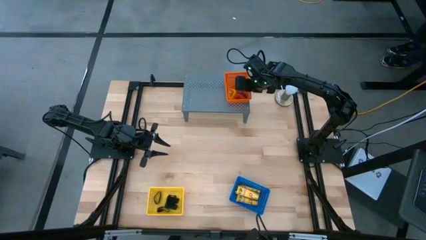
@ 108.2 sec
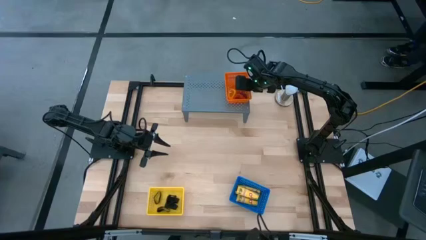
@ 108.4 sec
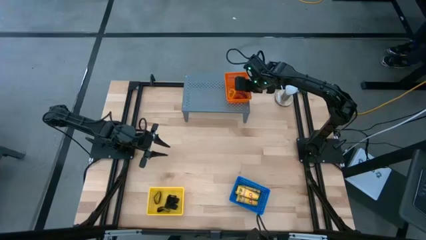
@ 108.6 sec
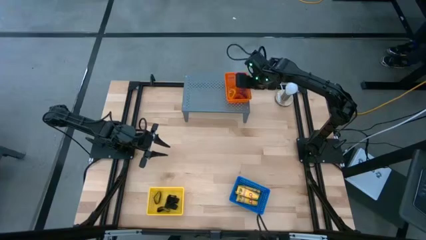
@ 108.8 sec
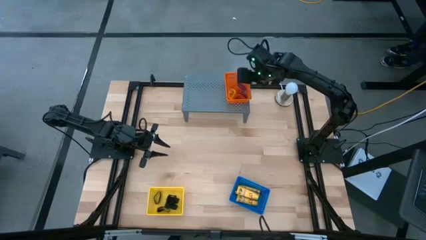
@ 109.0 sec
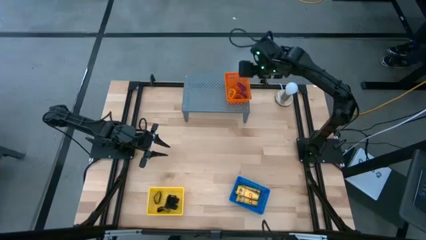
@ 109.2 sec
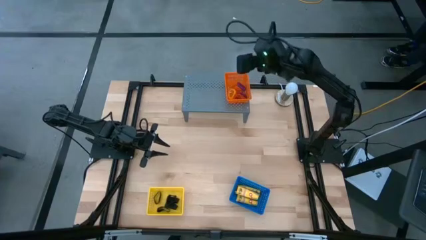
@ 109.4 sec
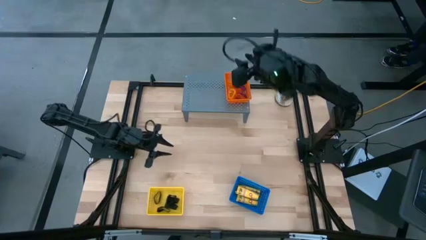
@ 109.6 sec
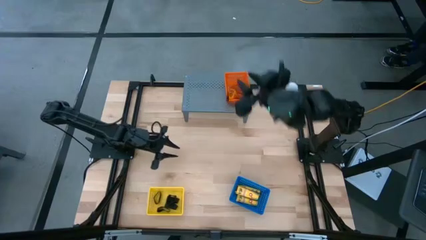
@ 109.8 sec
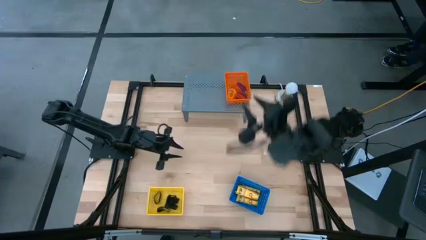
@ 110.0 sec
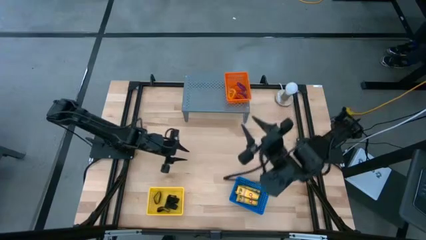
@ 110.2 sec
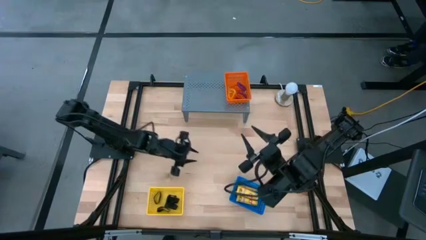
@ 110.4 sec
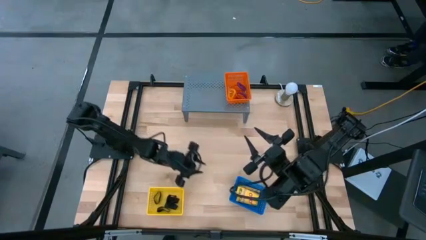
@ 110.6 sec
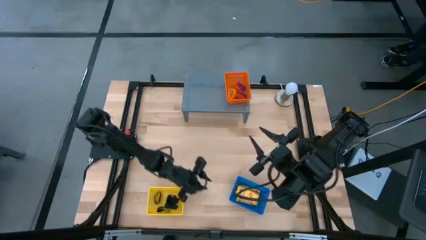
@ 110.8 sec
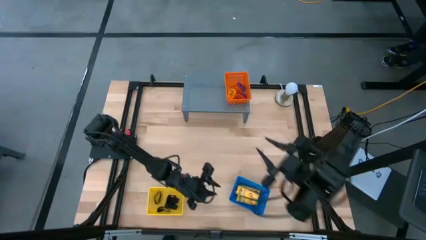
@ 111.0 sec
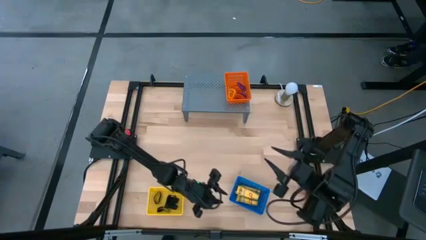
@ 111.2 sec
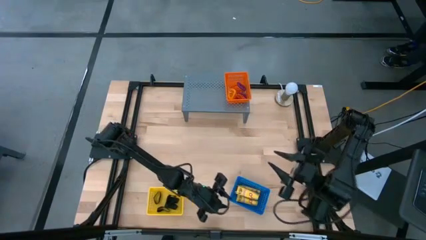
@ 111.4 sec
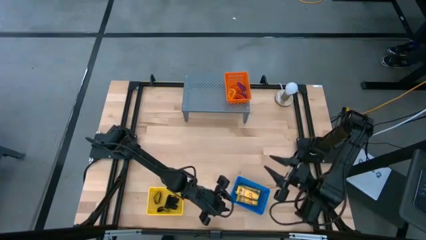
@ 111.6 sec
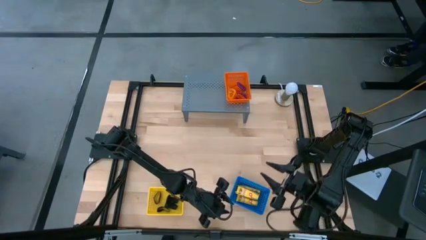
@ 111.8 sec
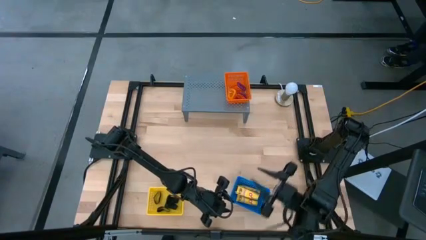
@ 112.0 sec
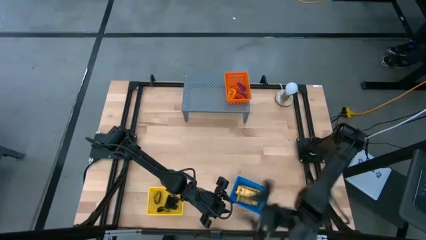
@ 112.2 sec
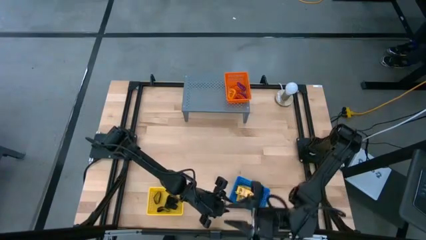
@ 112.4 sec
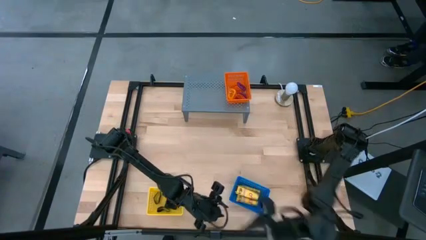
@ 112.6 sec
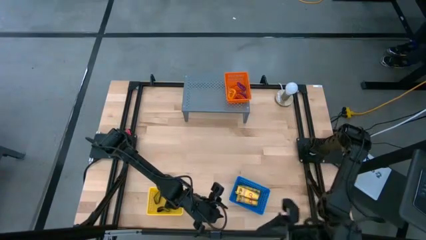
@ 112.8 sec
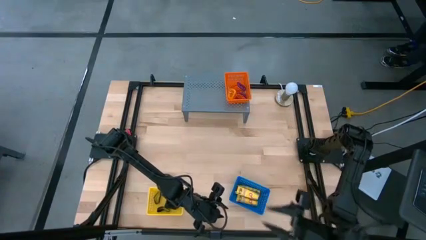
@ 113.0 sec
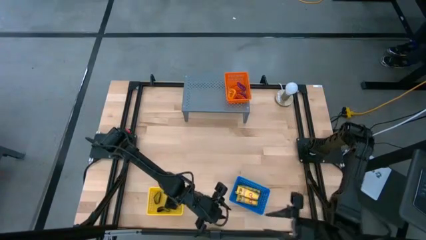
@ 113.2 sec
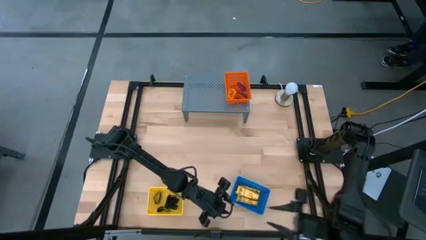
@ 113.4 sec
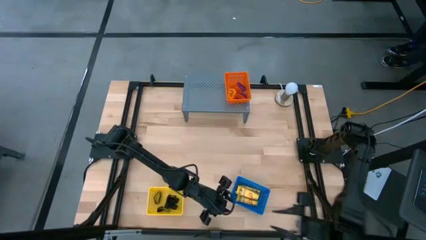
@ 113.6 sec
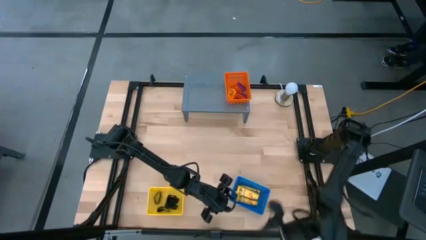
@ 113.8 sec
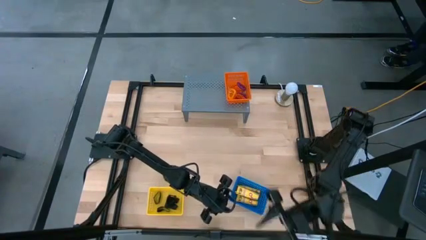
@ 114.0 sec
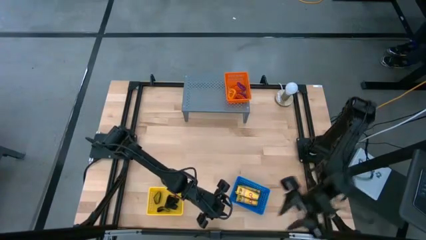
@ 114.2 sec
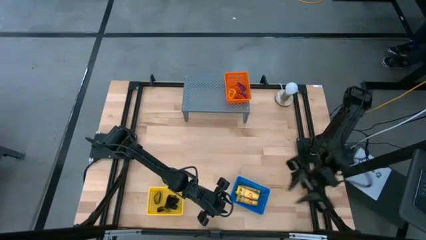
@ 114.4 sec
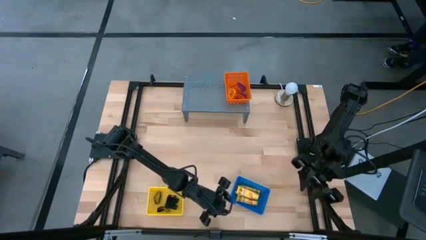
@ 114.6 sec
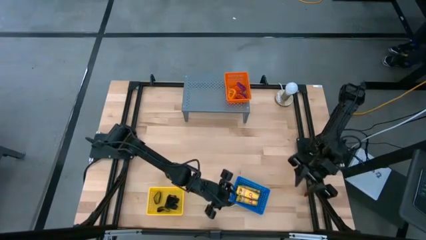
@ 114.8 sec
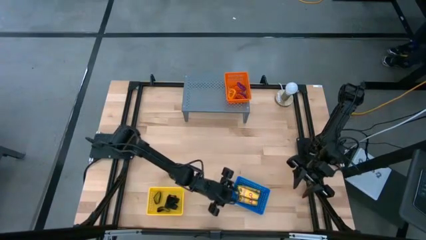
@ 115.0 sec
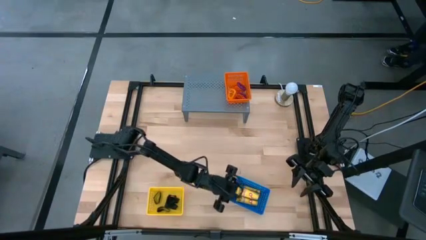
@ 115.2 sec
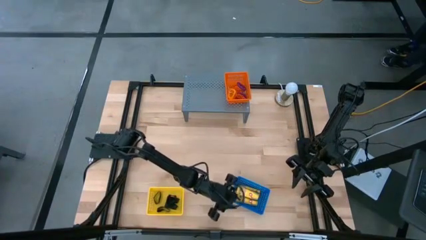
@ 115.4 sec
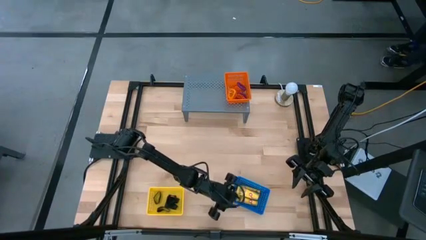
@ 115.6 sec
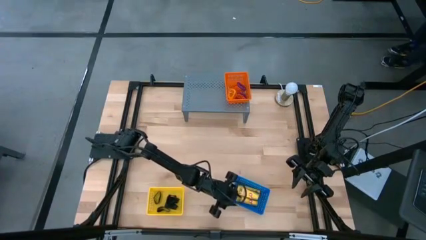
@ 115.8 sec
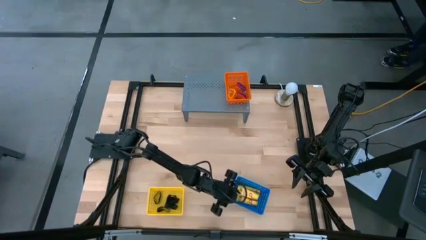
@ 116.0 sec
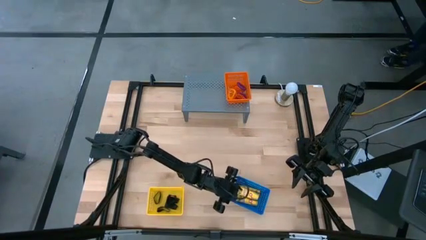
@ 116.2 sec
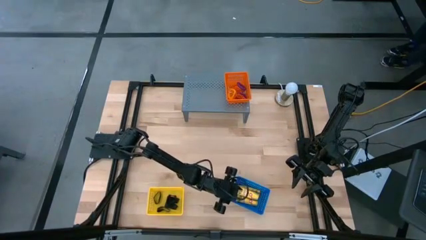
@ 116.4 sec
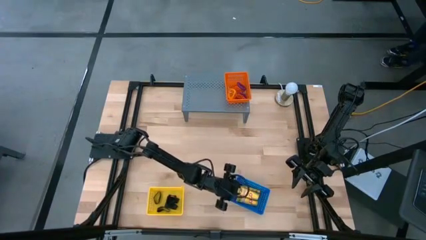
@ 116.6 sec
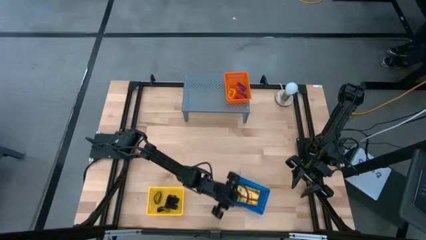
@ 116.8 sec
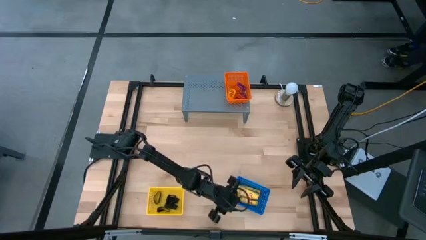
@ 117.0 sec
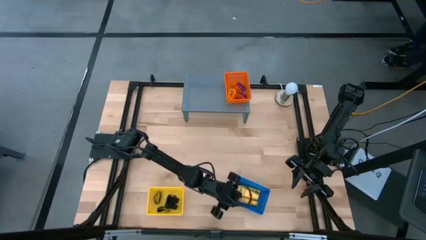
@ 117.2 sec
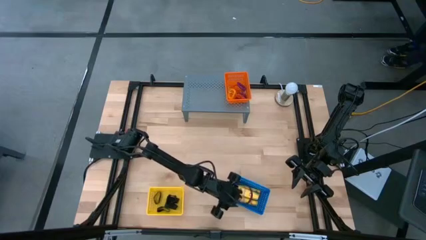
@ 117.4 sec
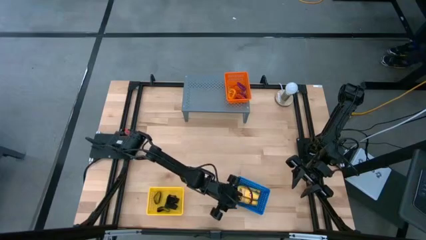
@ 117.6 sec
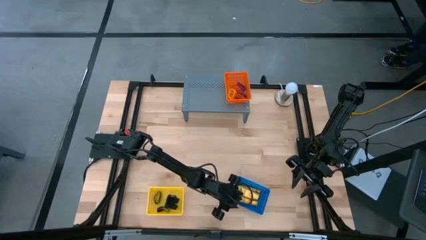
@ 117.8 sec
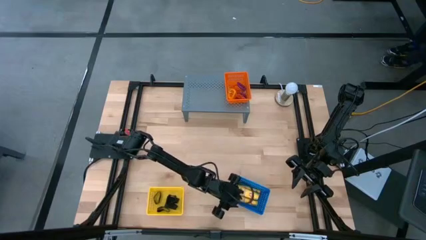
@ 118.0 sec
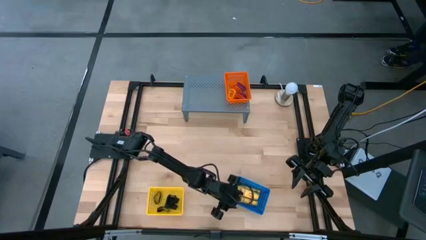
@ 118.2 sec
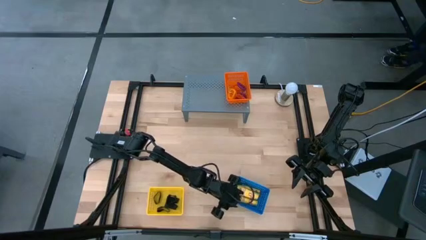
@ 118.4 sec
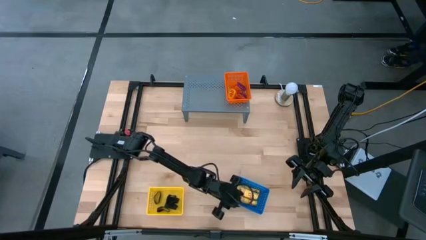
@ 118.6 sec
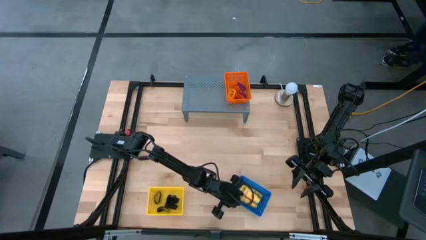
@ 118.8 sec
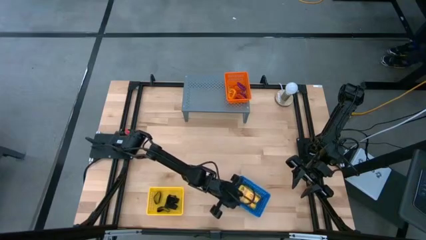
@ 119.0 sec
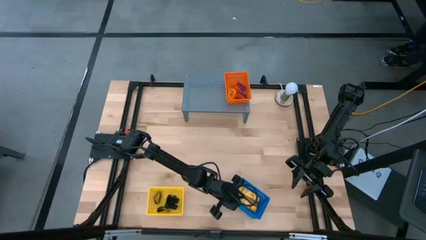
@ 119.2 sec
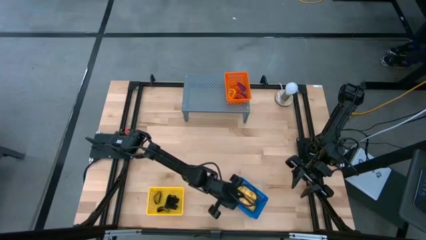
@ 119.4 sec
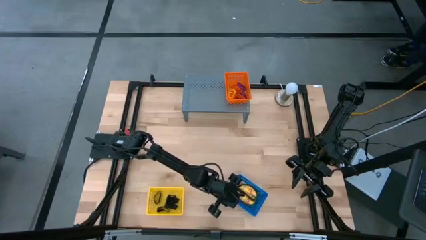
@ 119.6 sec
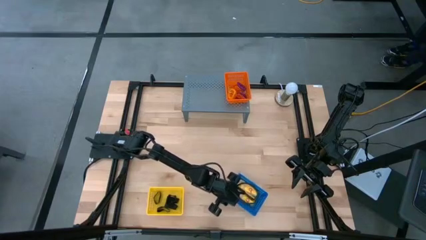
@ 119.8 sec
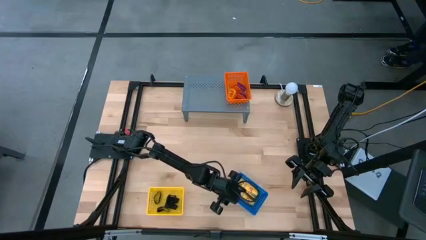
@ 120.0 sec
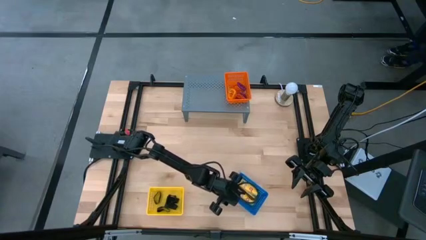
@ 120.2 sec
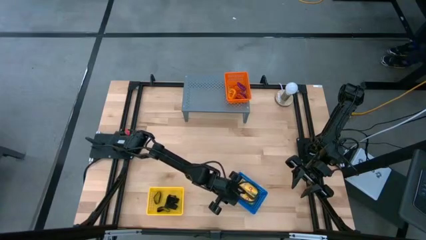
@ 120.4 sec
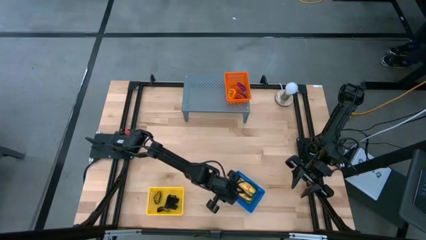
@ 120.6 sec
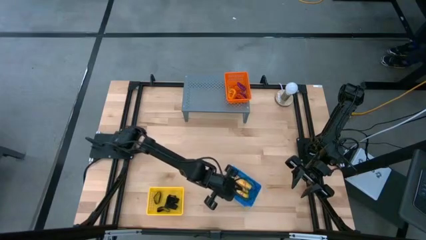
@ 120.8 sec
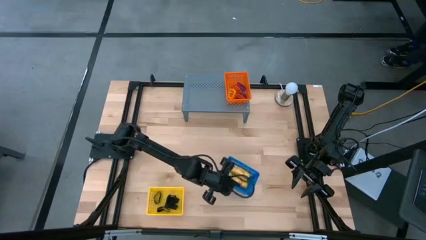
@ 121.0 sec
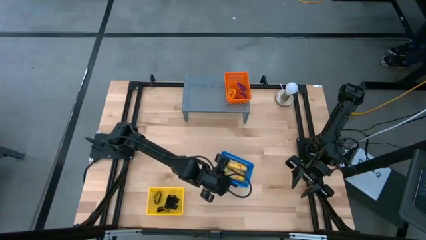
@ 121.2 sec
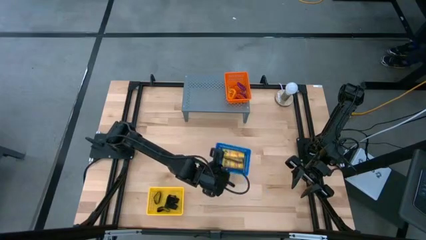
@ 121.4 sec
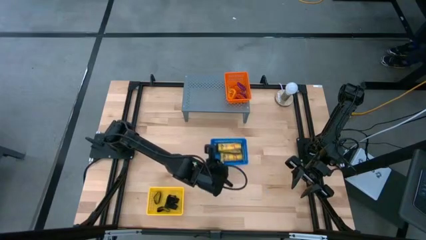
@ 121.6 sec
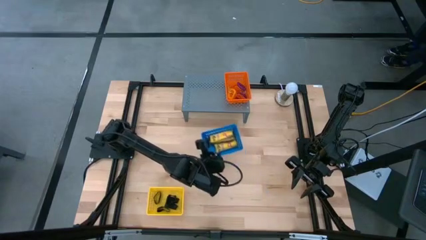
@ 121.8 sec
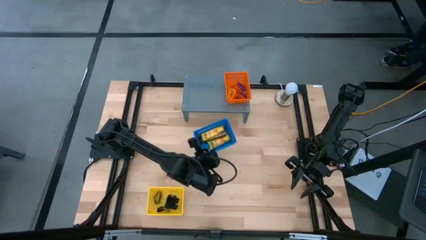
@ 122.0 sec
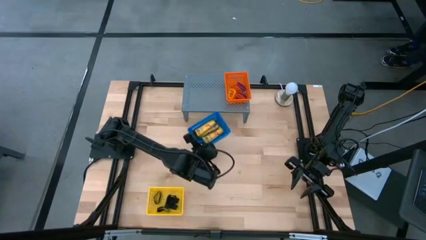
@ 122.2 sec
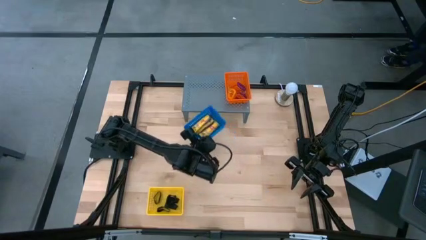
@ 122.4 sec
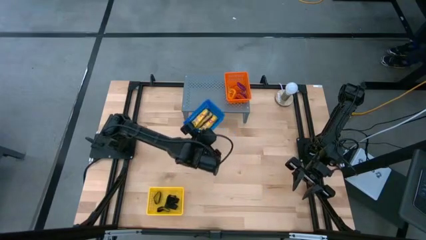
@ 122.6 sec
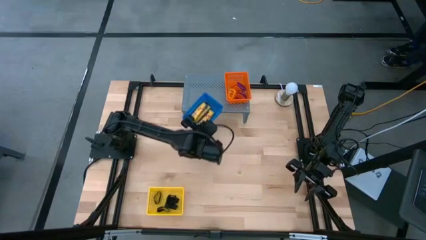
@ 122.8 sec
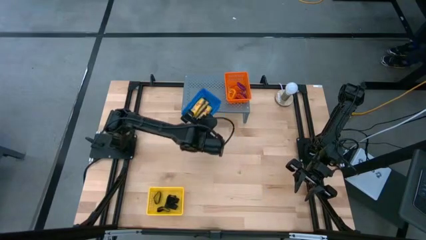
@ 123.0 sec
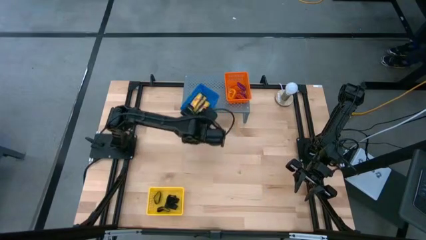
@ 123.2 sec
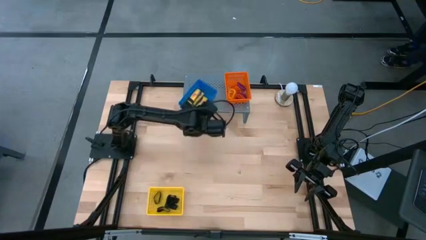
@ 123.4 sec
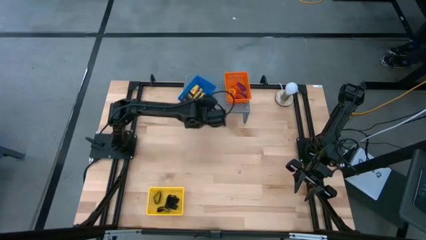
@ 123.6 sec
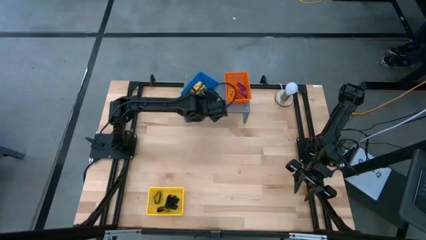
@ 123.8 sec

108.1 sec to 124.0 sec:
Task: Pick & Place Office Desk Supplies
Put the blue basket onto the shelf
